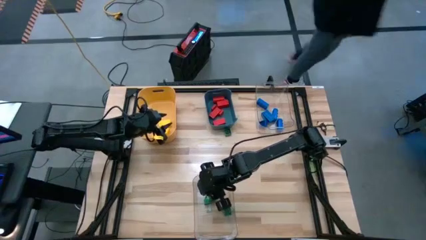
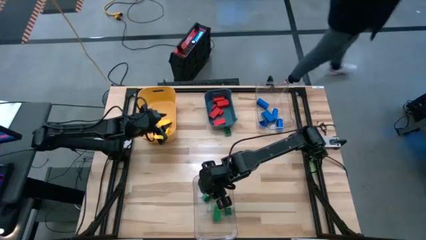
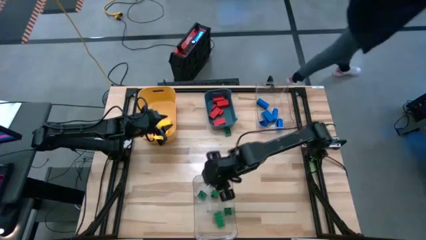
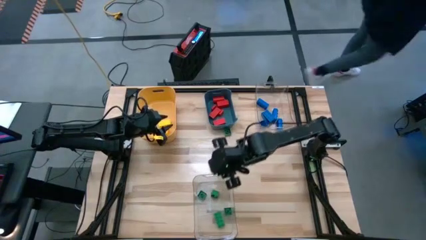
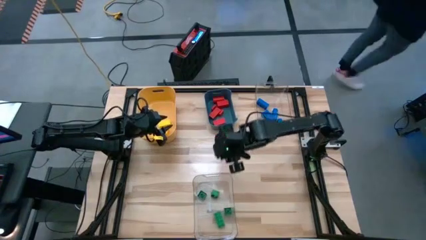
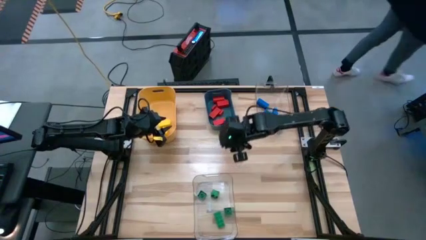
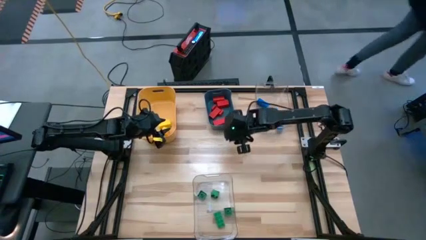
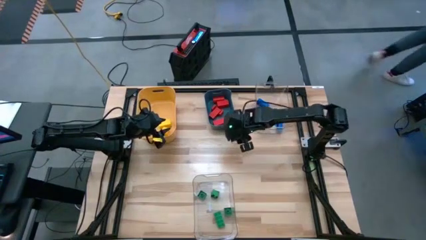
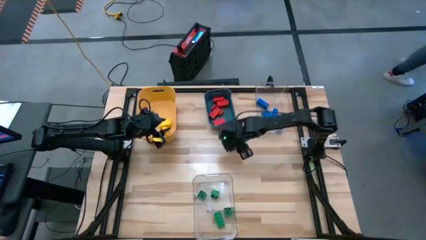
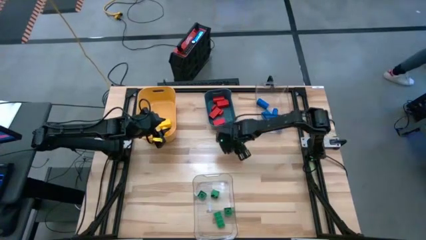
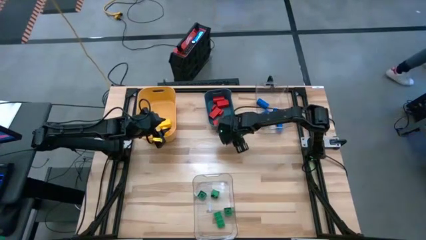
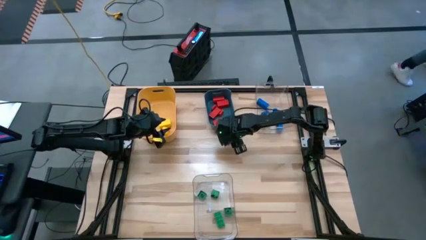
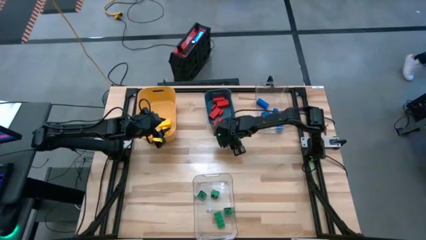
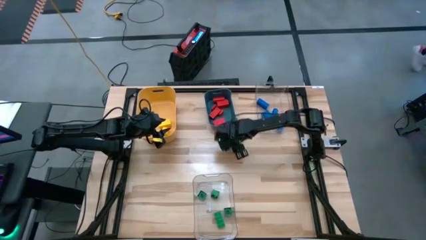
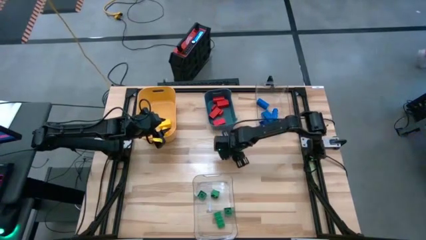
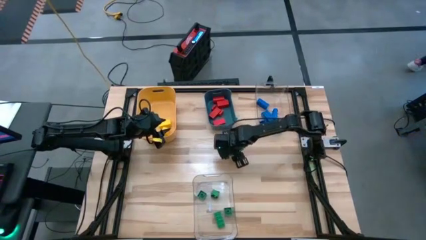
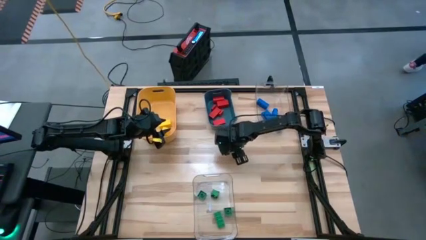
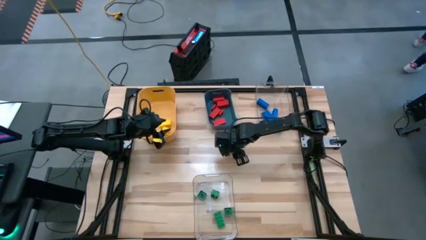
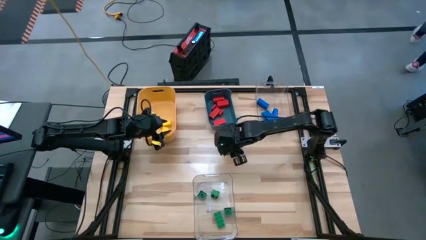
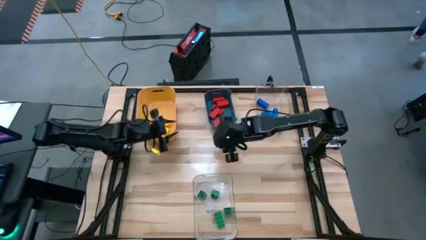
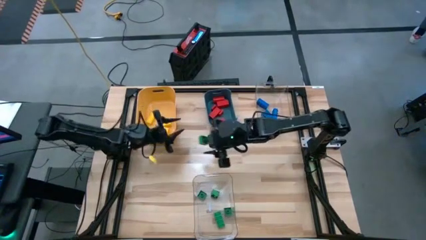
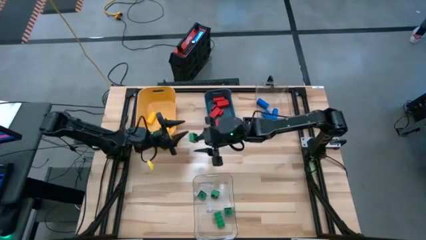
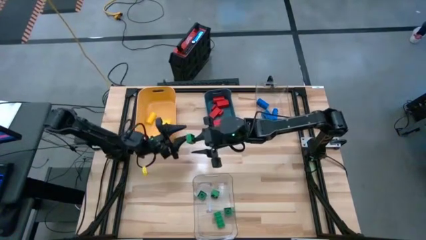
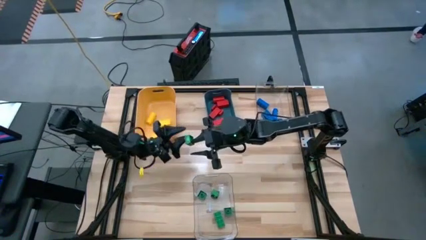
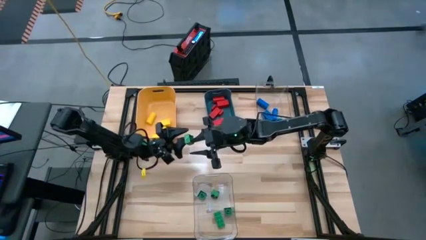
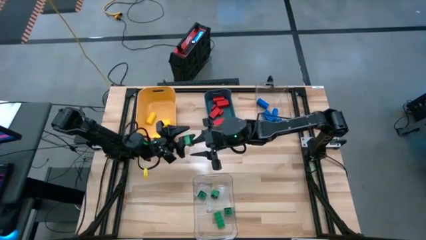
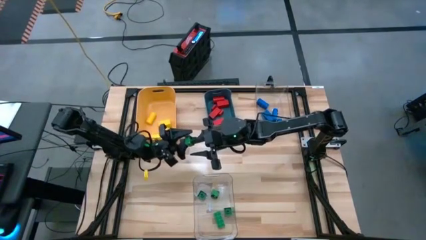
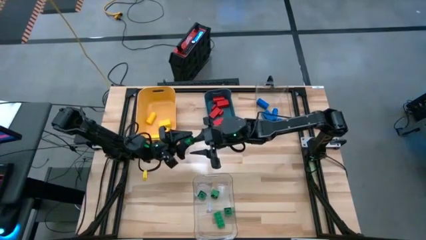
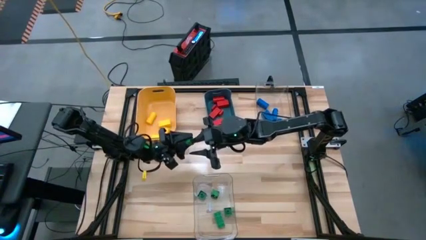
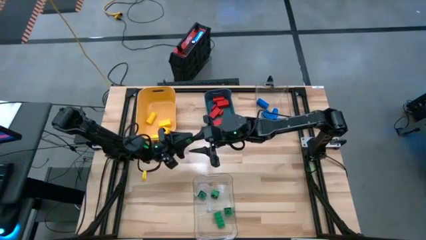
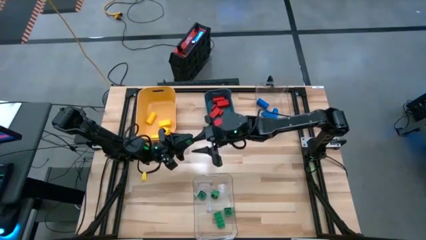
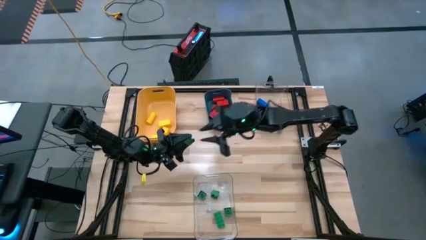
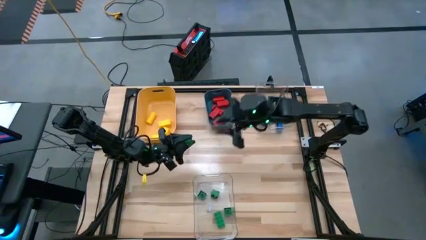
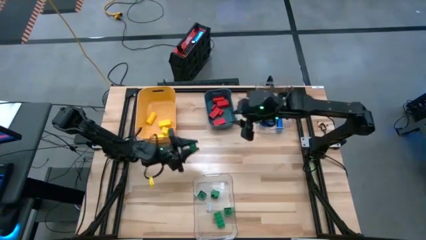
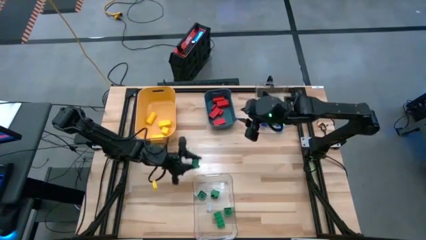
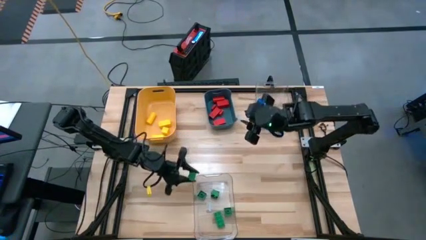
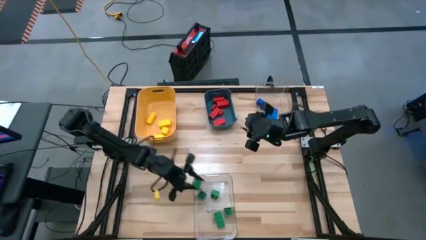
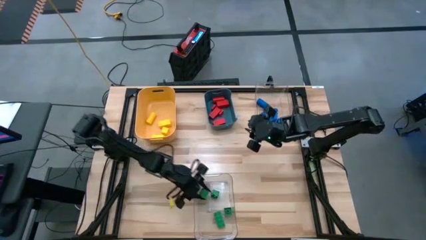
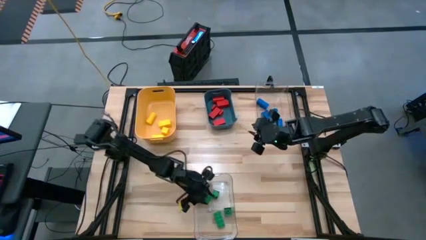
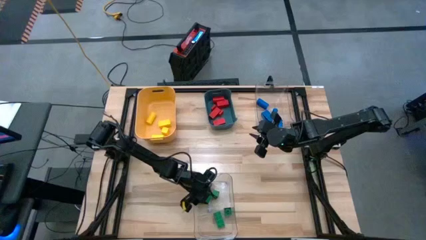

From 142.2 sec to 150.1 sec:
Task: Sort blocks
Put the green game piece into the bottom transparent bin

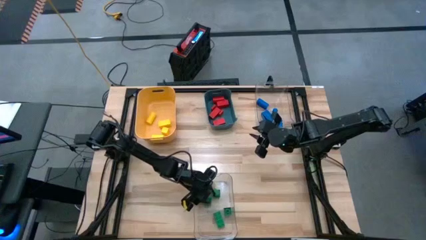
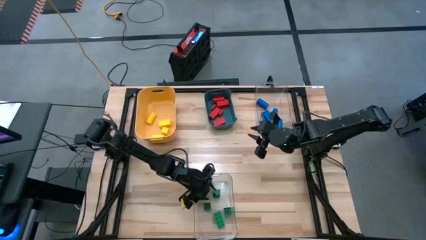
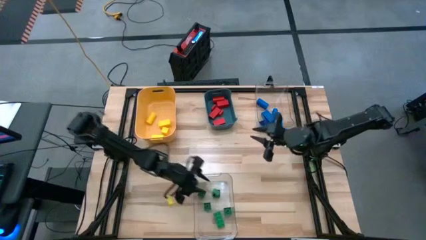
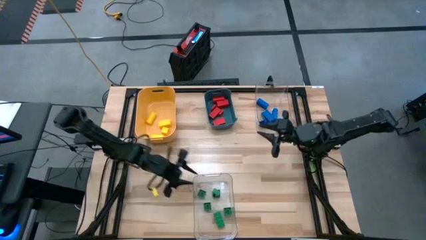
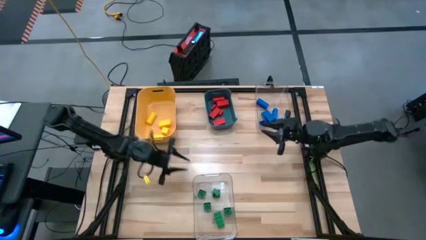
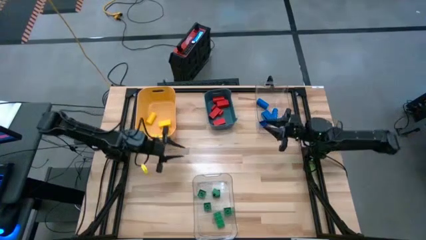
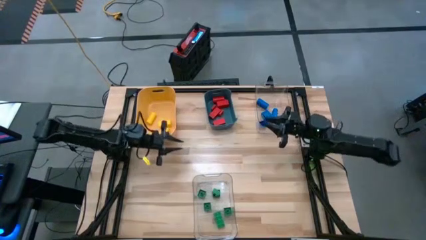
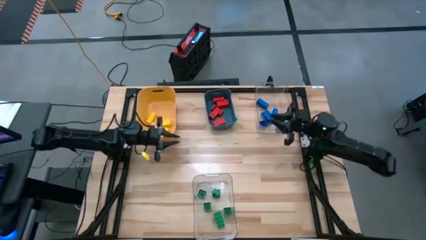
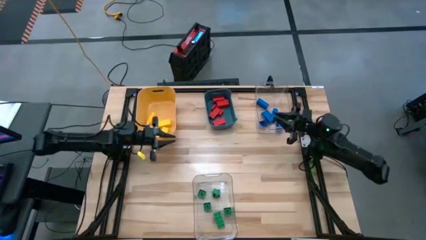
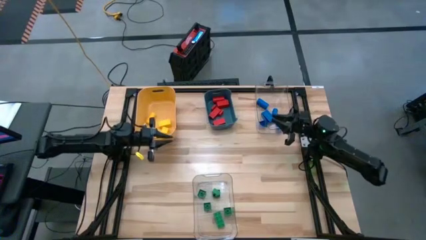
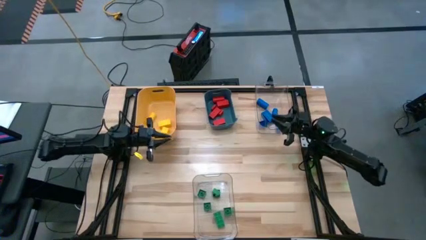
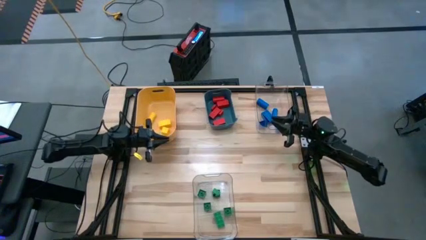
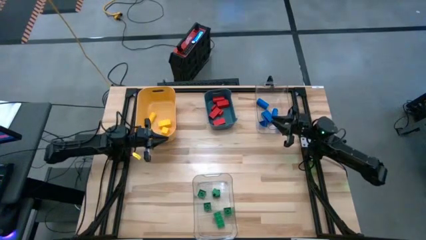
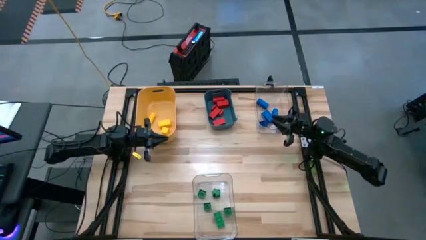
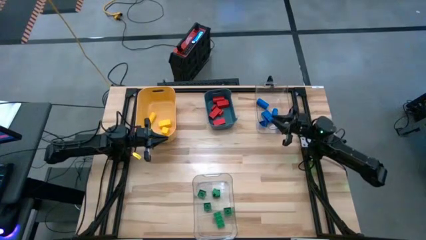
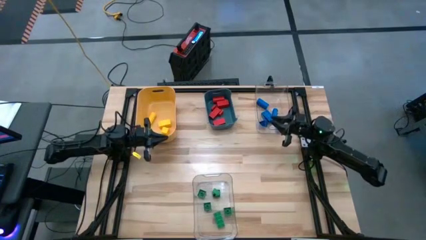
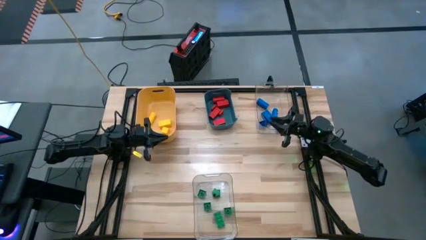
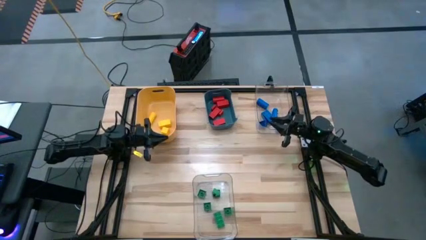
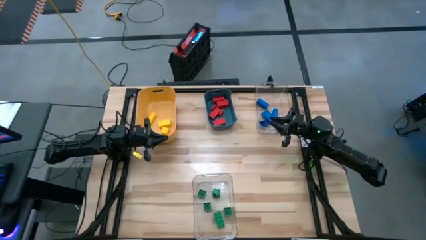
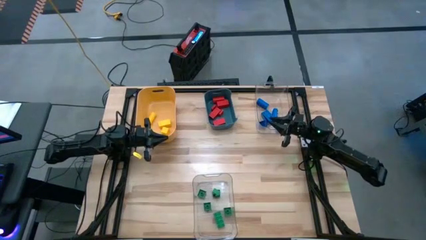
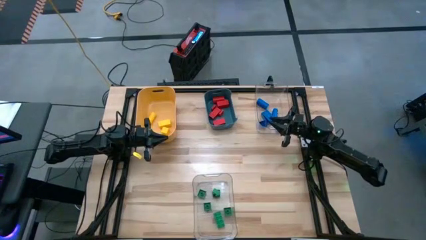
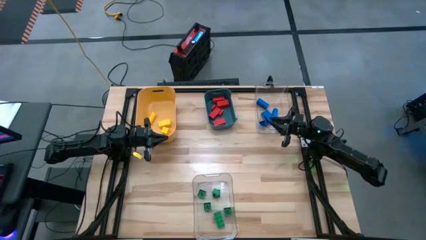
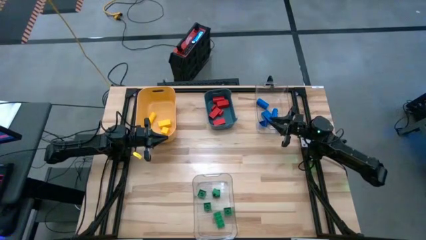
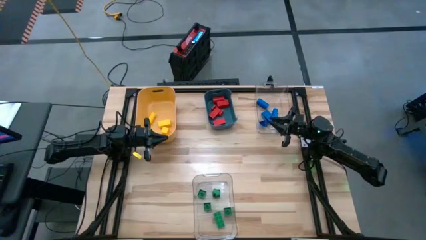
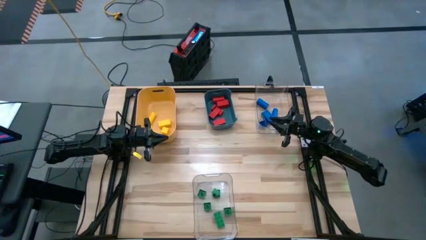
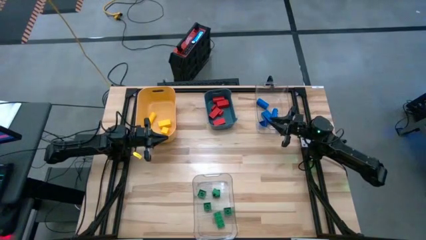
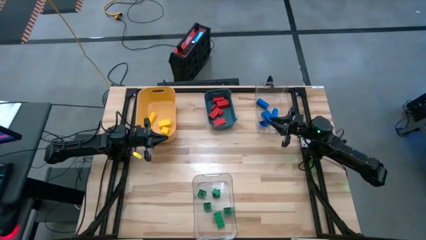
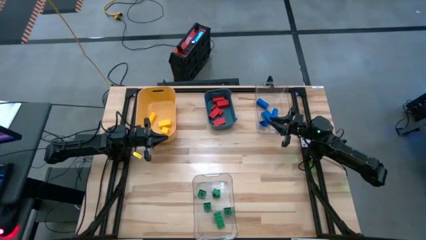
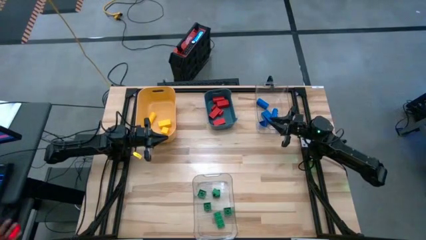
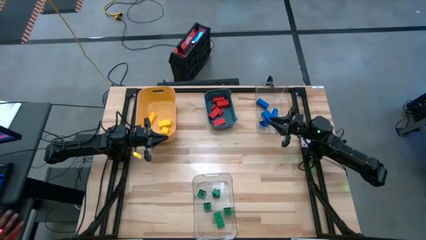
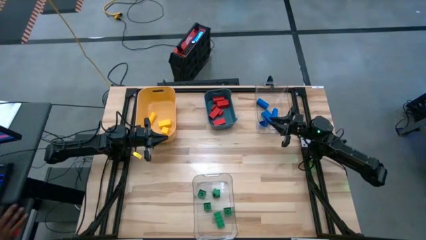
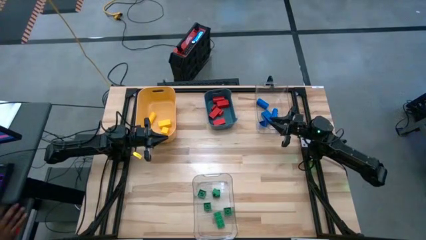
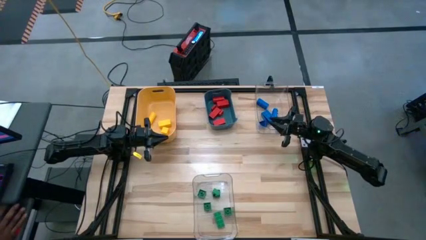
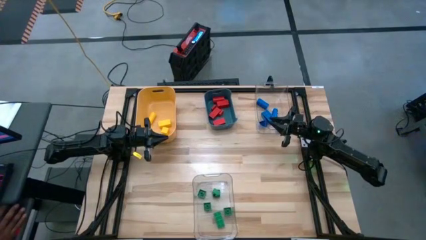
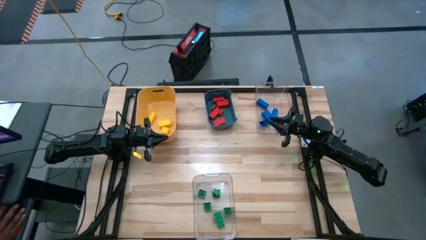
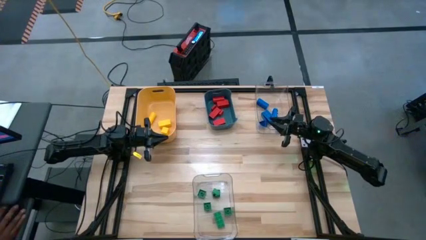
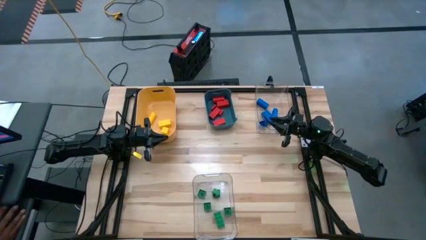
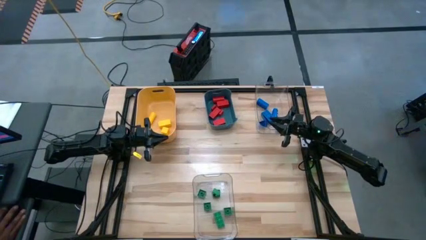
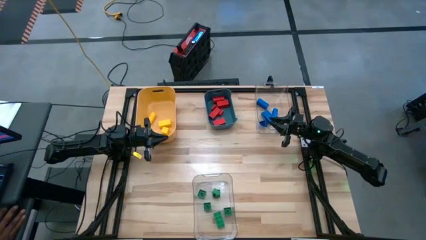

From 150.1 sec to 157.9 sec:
Return to Home Position
